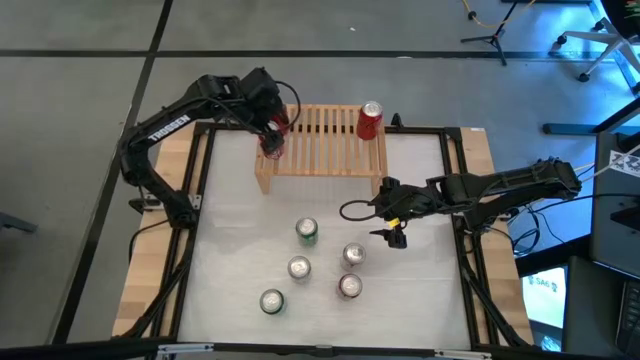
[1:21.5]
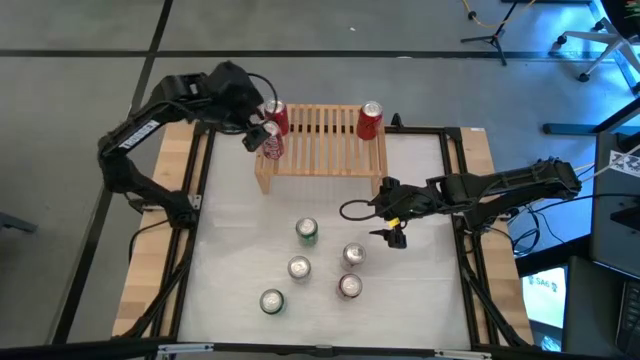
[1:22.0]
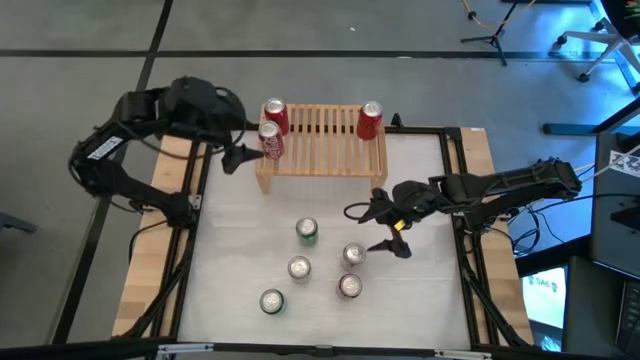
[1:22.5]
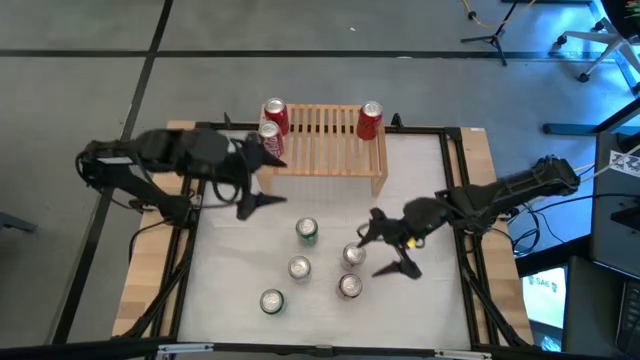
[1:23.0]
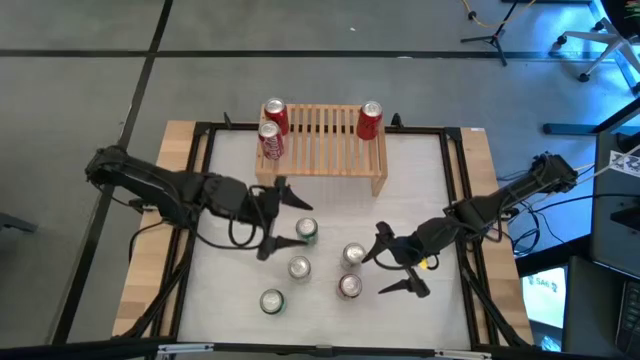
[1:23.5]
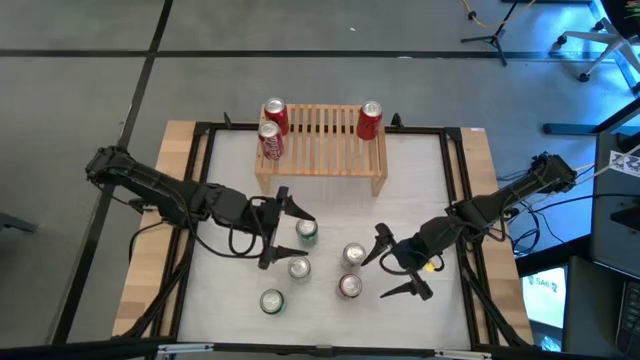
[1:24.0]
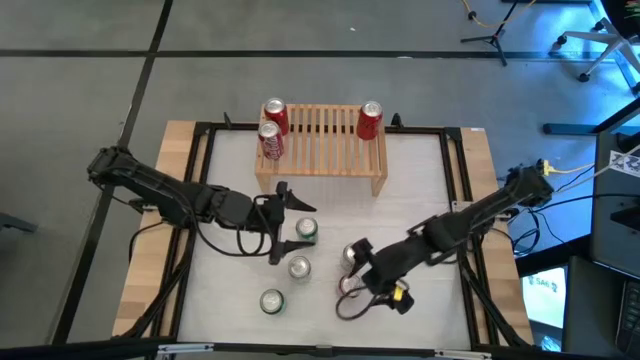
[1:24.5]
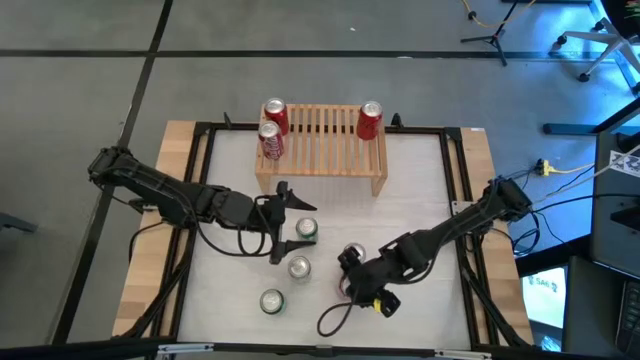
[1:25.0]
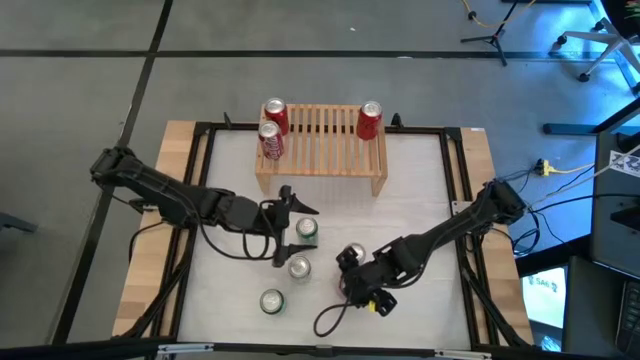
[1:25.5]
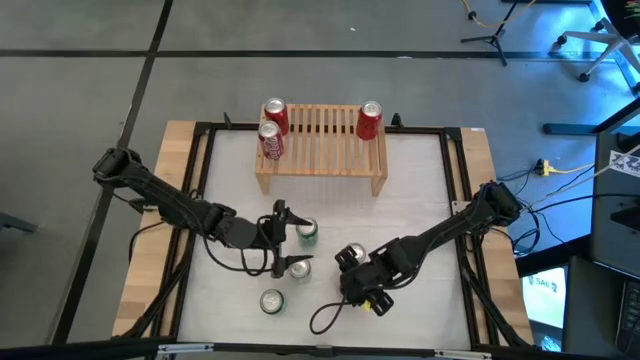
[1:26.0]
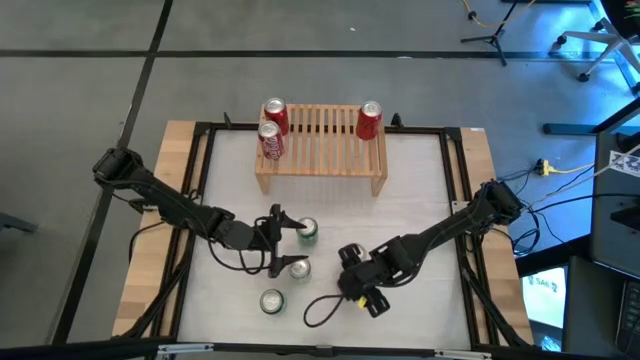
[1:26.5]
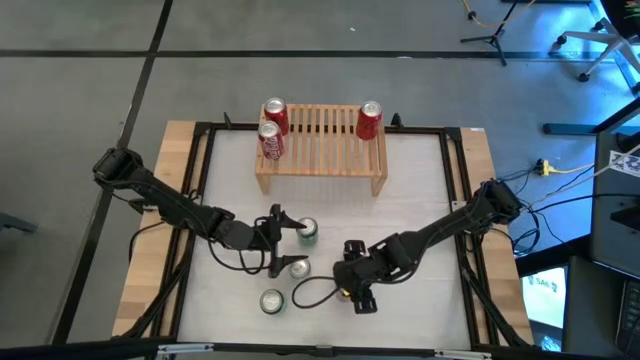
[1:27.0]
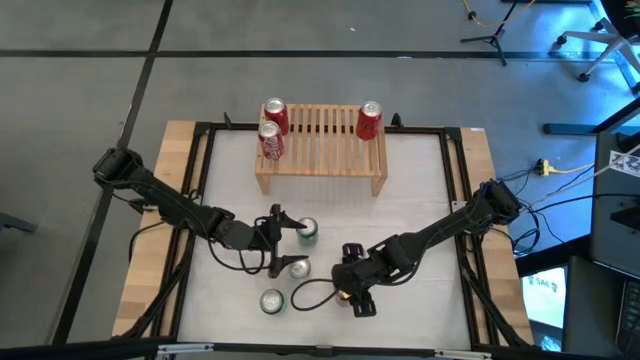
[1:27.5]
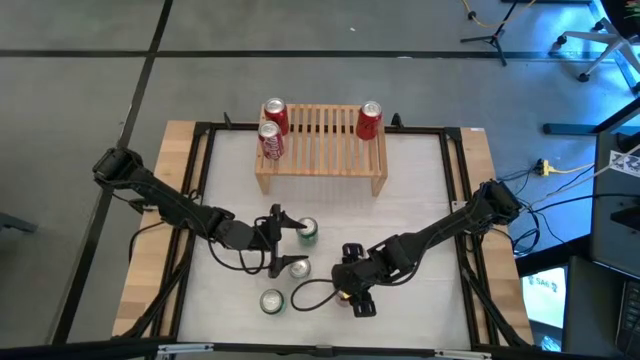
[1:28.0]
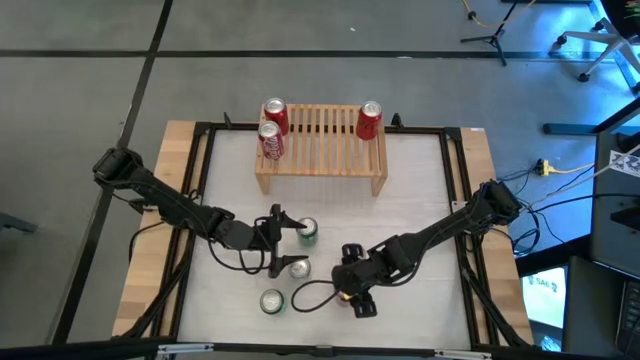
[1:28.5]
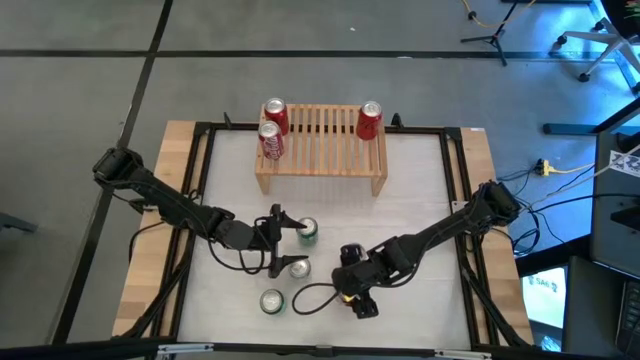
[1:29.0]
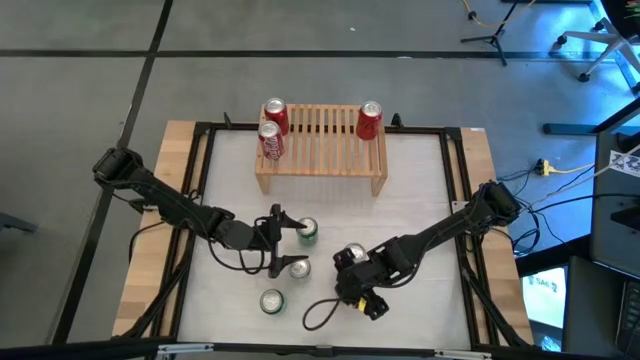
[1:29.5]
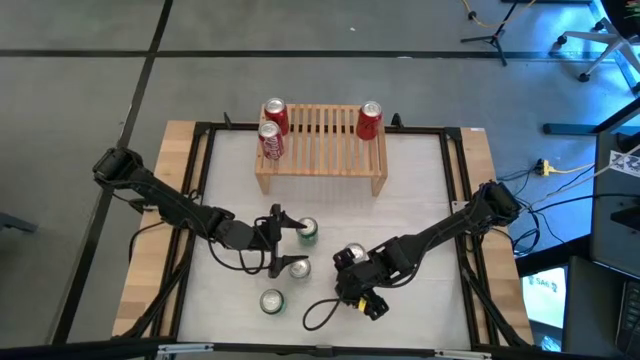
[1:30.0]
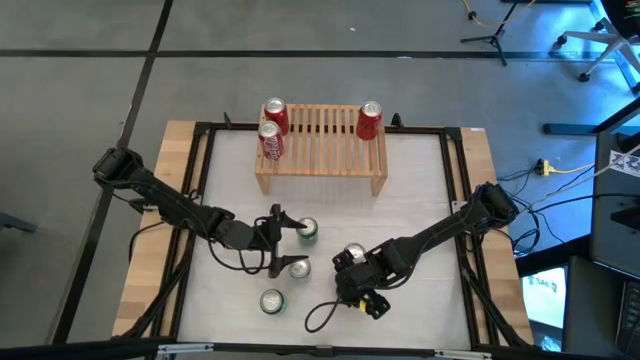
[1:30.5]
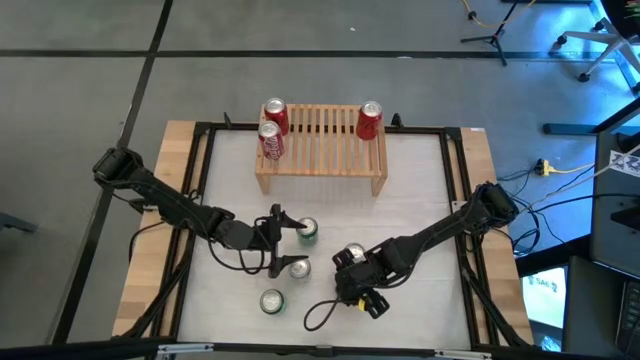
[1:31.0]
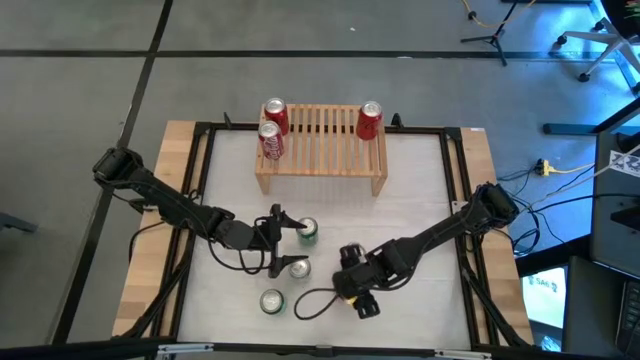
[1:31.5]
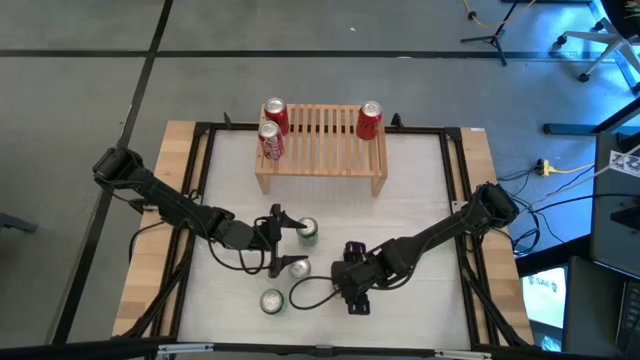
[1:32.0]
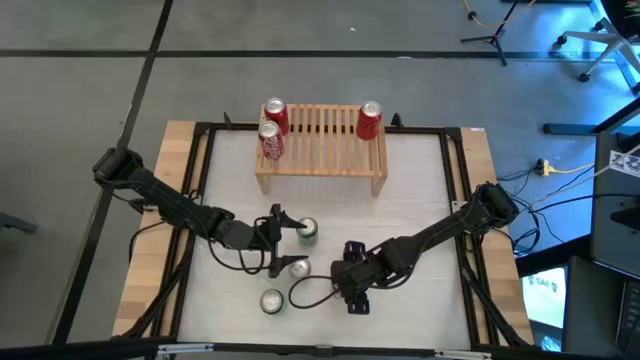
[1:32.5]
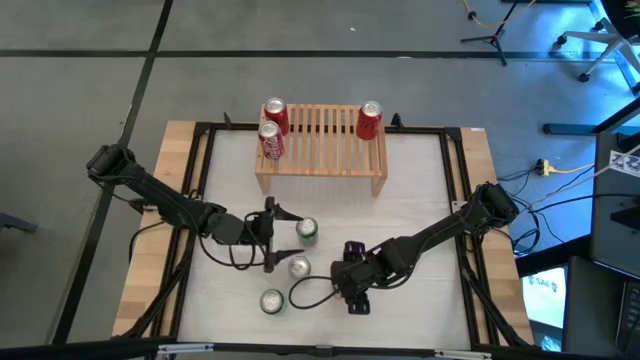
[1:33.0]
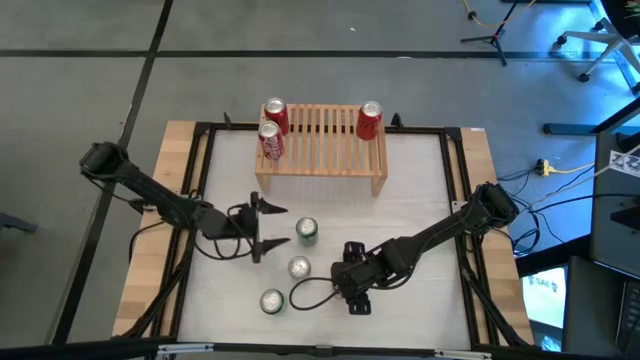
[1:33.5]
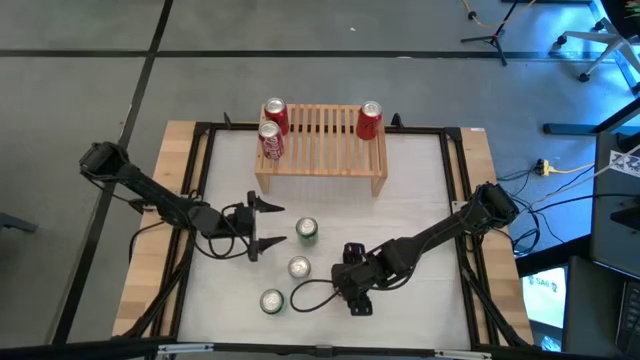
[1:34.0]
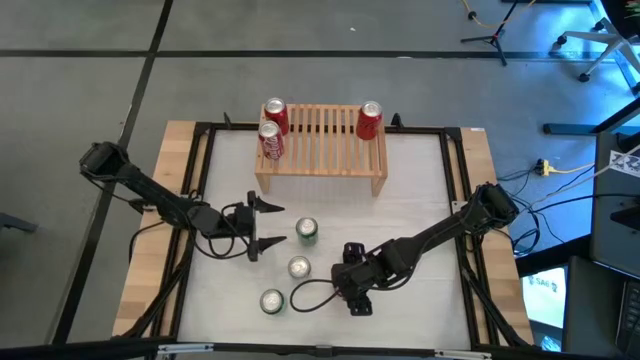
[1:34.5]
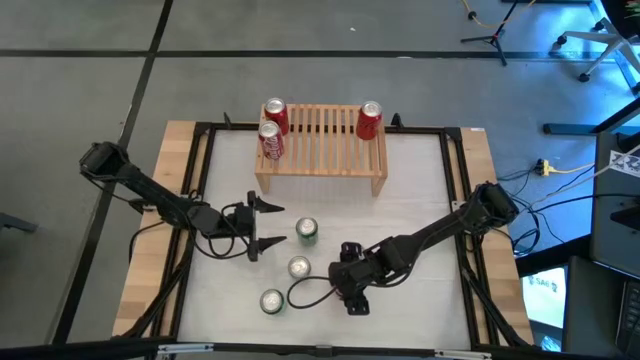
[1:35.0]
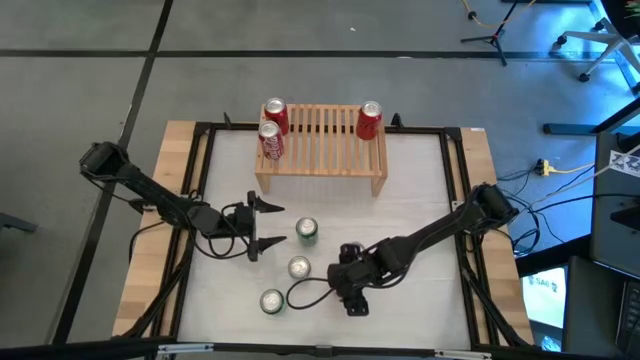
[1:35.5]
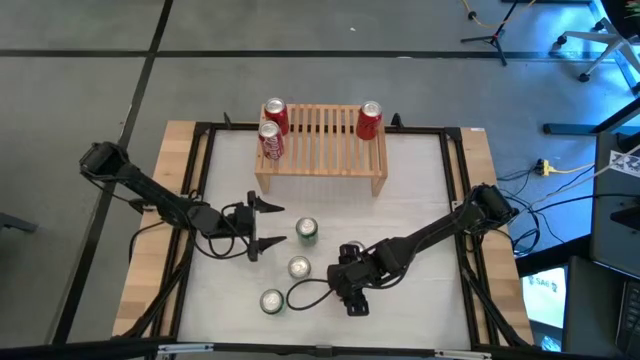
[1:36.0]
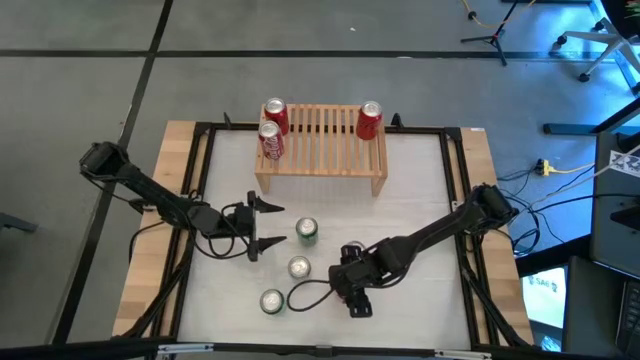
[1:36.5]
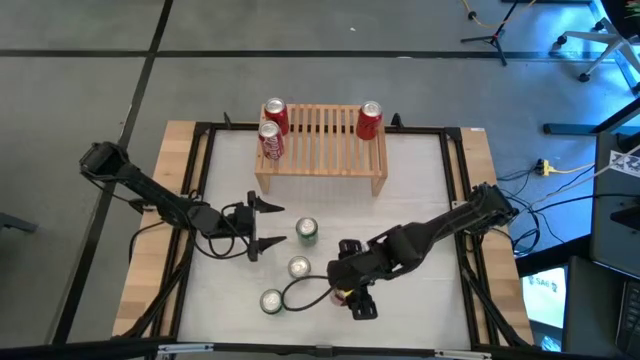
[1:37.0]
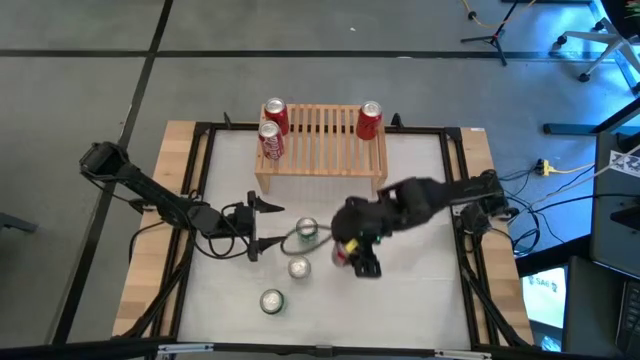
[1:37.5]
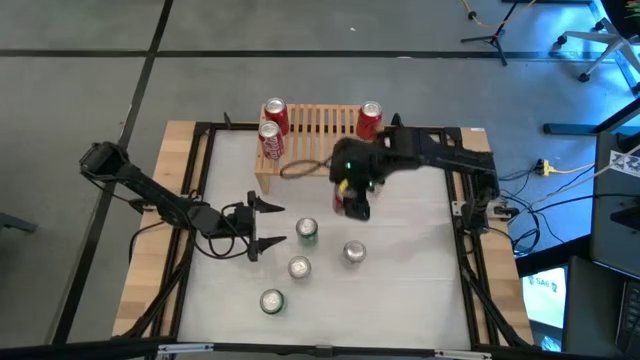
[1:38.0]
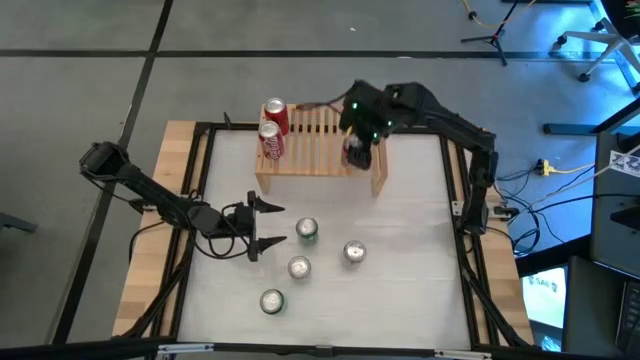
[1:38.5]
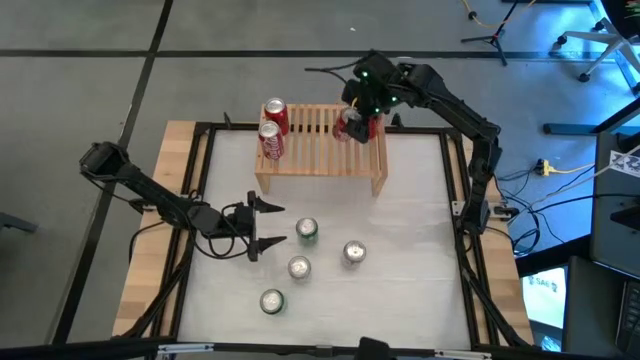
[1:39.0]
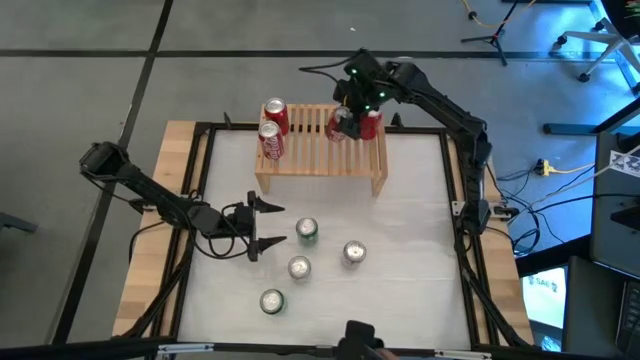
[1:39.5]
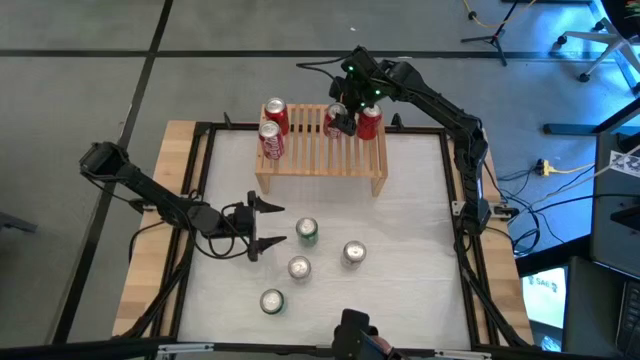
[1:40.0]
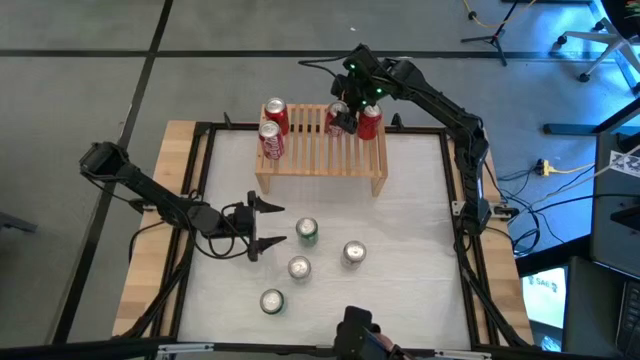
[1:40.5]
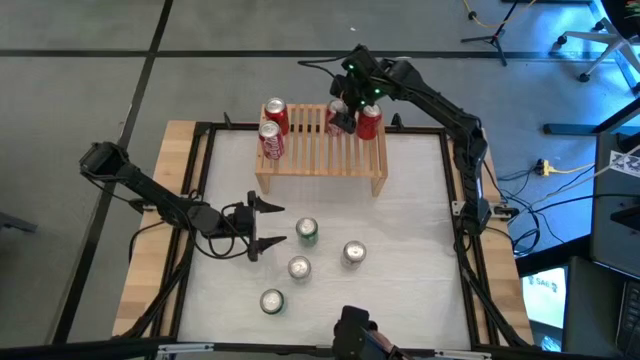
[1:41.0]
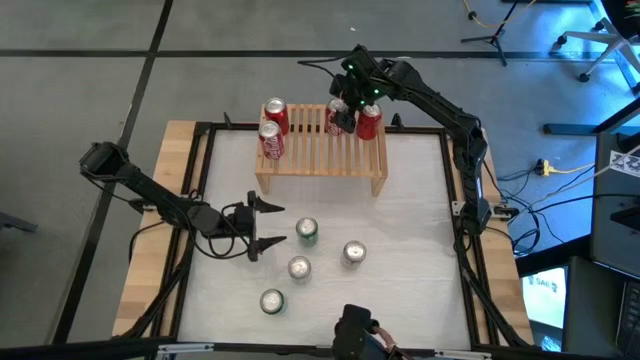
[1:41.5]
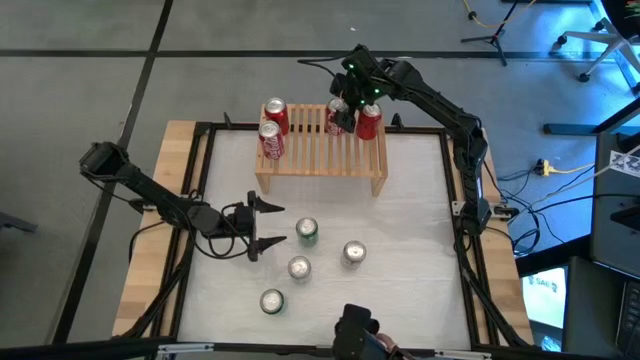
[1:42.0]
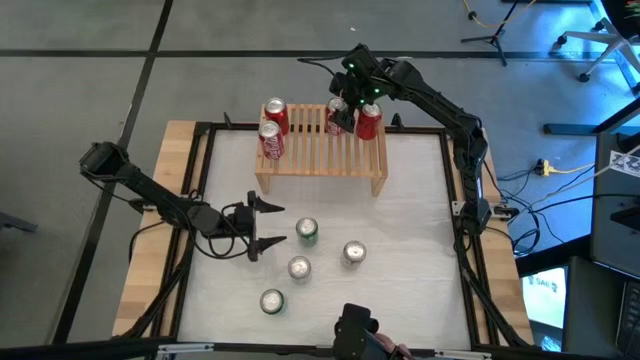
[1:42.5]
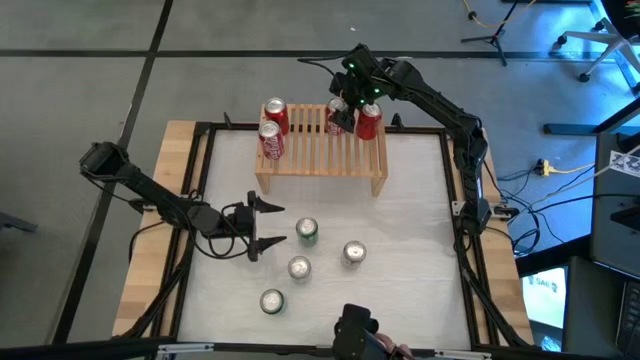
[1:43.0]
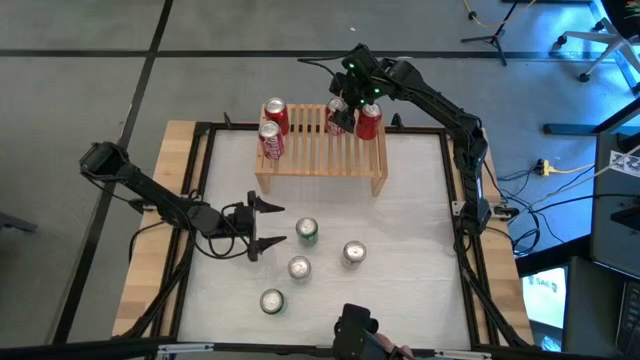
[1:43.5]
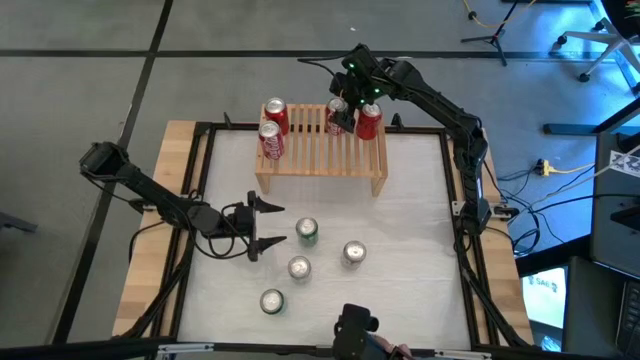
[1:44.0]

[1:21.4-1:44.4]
Task: Place canned beverage on shelf
Put the red white soda can on the shelf
